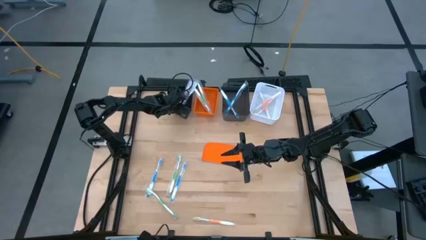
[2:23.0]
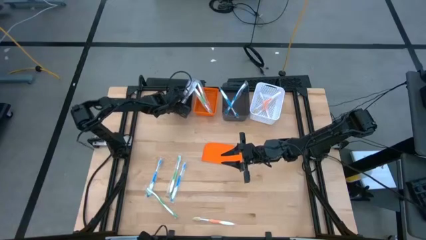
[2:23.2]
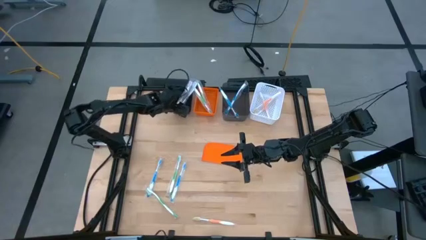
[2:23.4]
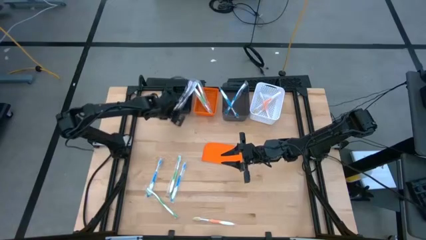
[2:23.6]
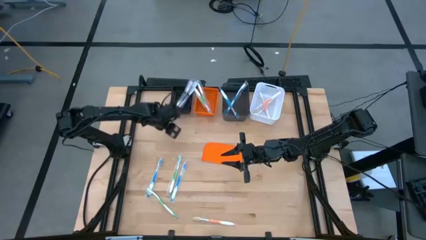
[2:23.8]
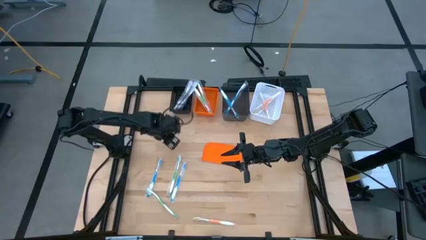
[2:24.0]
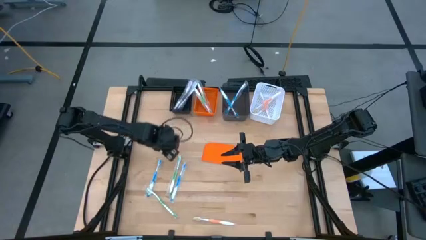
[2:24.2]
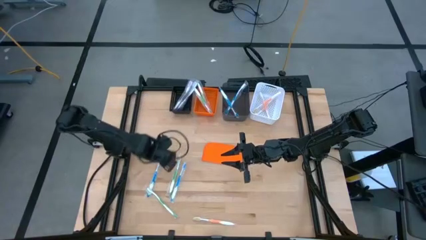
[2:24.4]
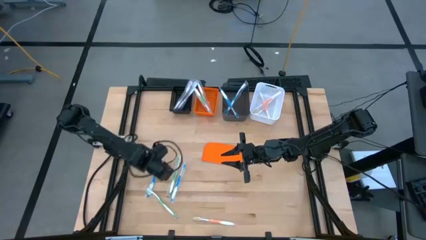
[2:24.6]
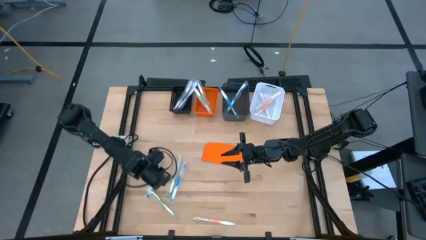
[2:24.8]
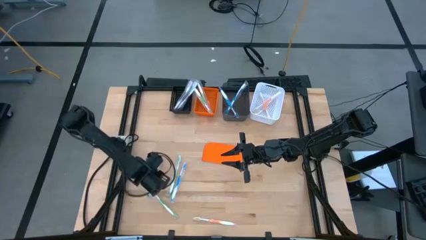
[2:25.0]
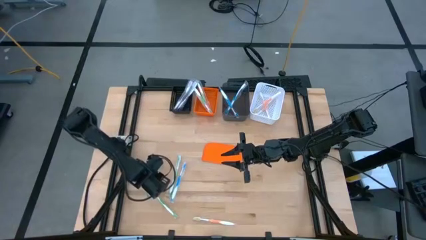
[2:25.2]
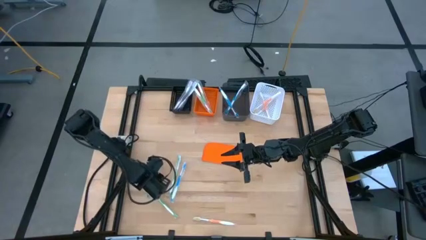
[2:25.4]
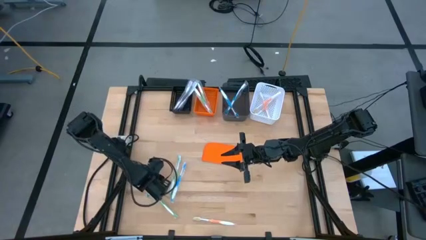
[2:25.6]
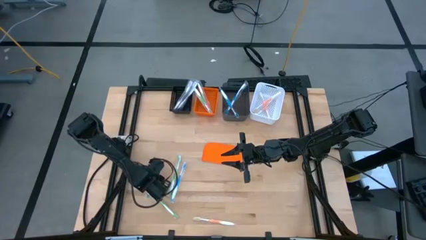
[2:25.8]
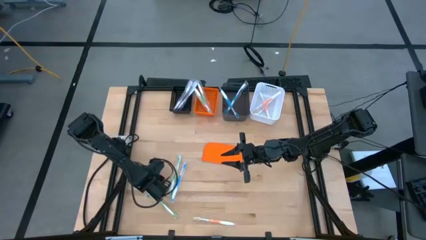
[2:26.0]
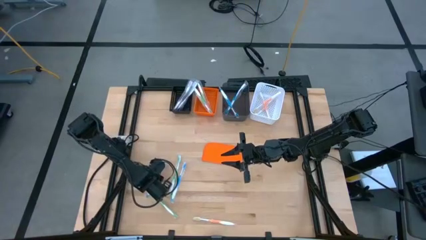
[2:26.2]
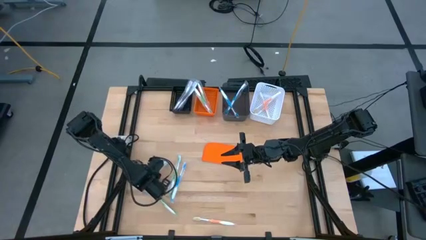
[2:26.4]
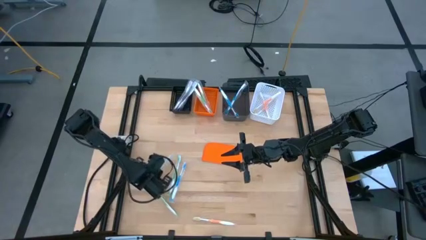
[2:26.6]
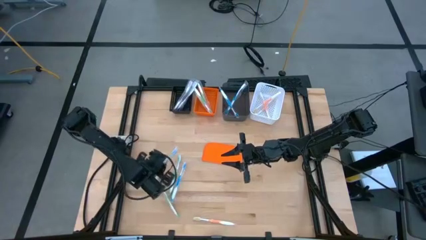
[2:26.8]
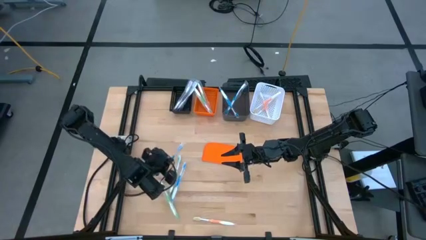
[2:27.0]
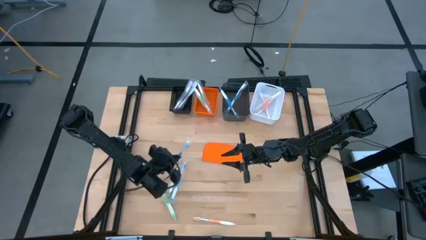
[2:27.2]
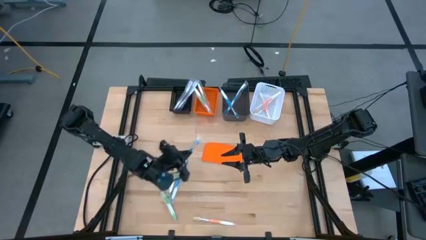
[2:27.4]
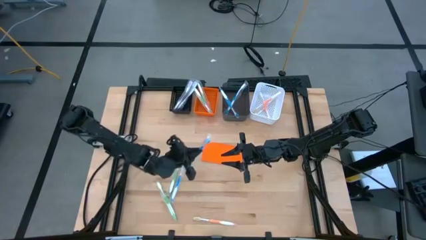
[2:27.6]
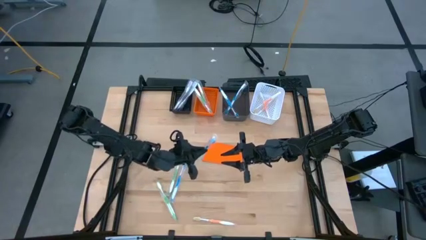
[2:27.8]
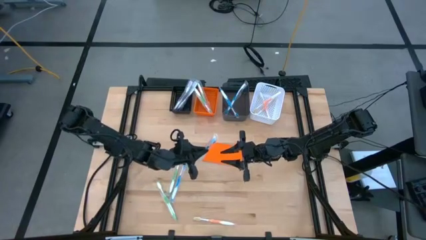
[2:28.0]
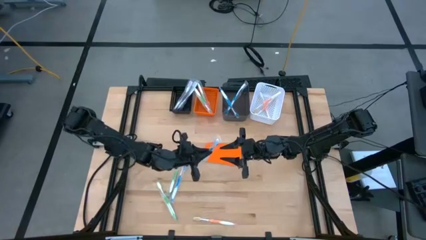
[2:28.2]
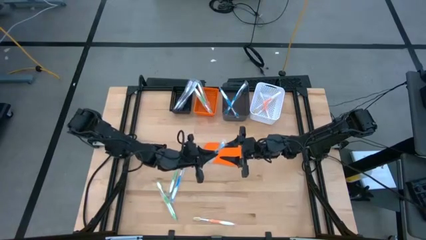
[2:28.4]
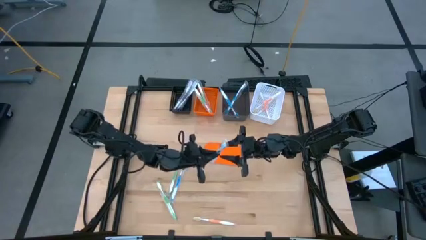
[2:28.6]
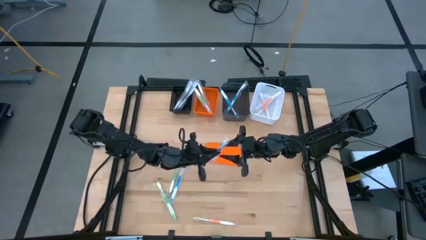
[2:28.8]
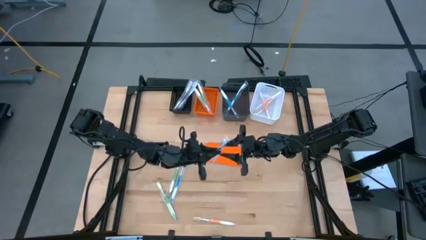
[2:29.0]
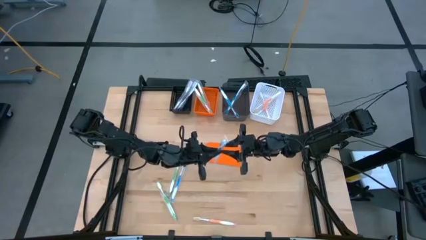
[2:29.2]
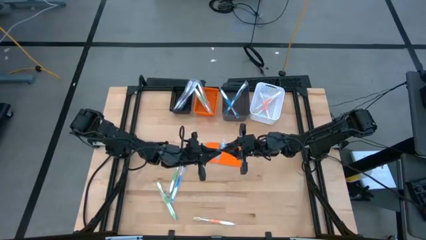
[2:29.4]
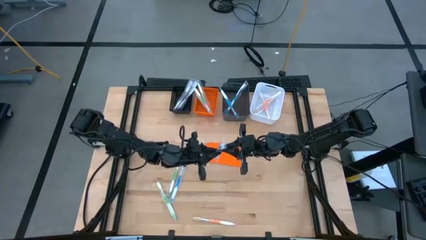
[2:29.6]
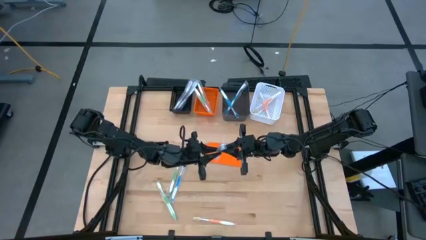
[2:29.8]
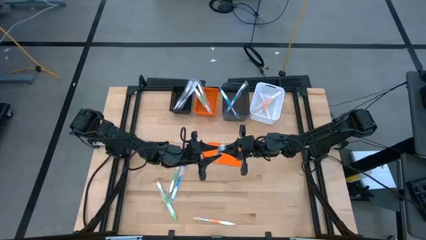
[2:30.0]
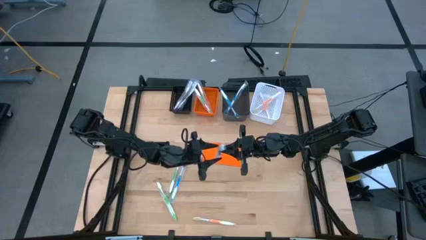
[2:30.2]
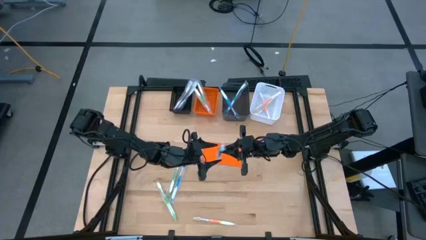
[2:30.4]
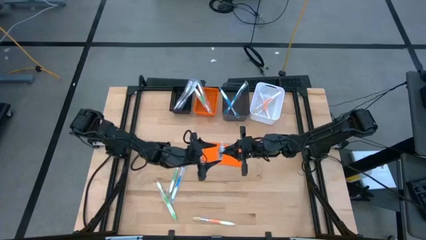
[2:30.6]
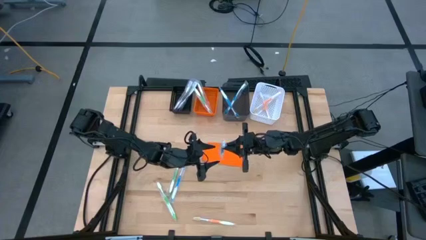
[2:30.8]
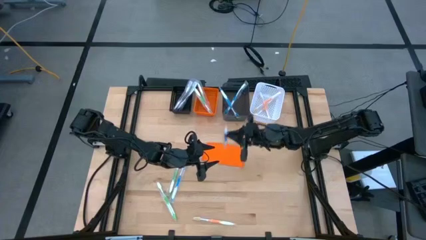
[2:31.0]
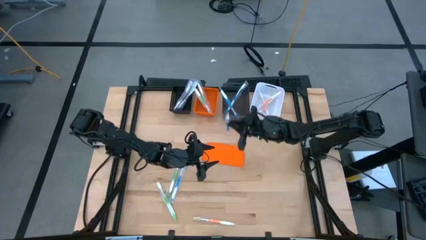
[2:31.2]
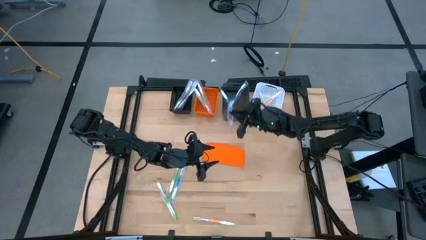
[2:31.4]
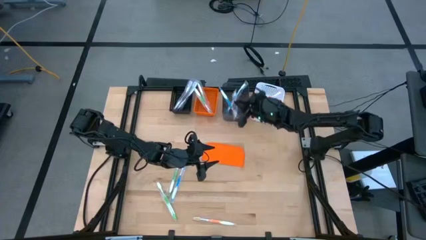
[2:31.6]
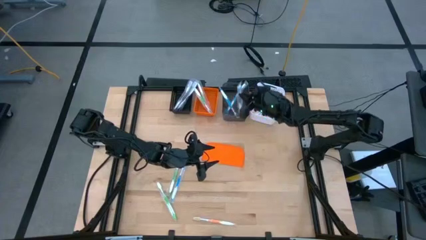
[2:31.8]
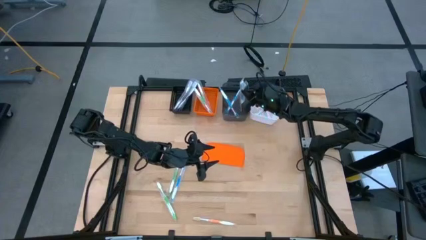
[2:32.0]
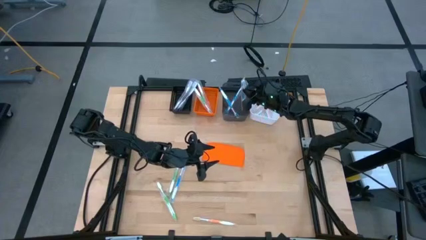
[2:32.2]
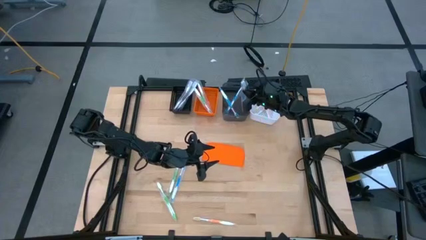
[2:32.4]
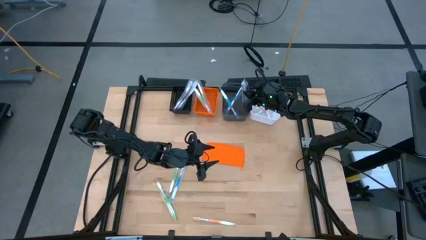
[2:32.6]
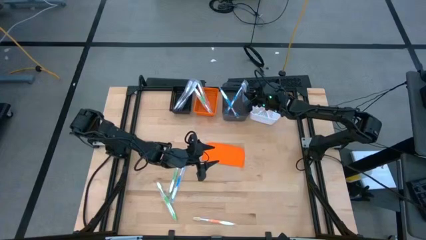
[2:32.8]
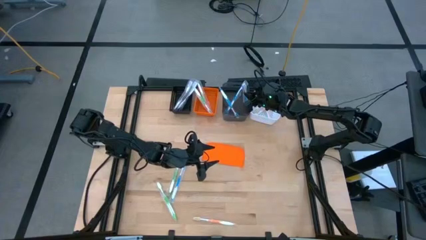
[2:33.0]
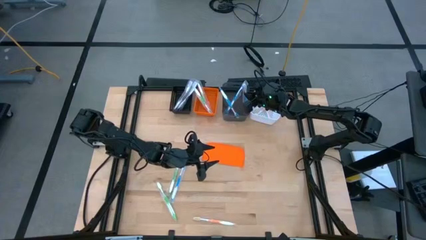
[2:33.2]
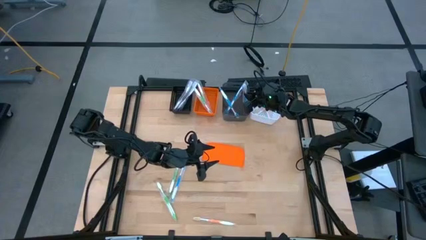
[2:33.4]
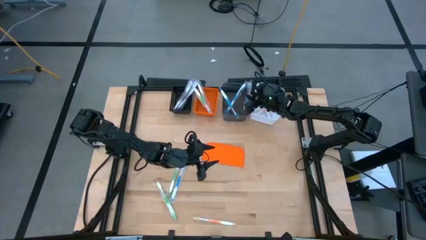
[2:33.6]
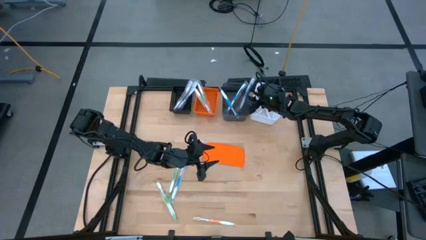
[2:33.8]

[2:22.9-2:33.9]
Task: Pick & Place Toothbrushes
Put the blue toothbrush into the black transparent bin
